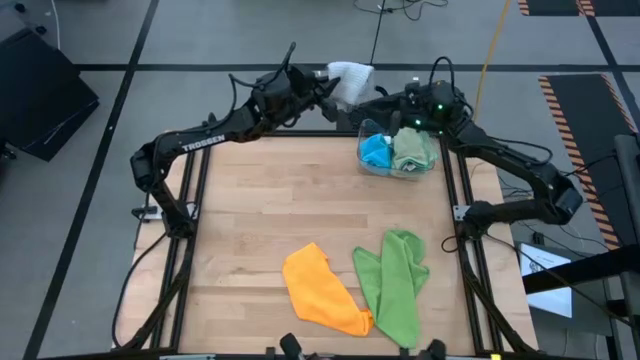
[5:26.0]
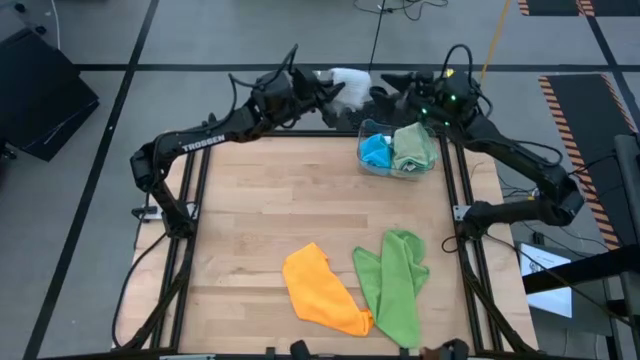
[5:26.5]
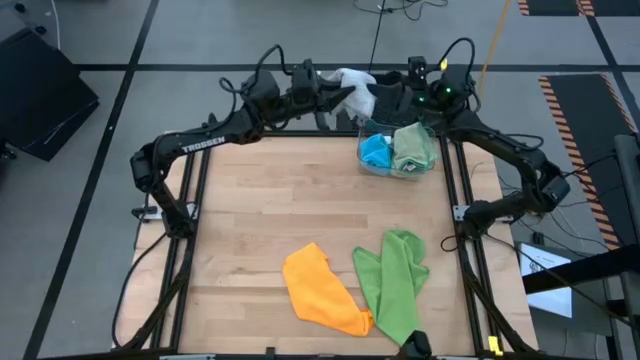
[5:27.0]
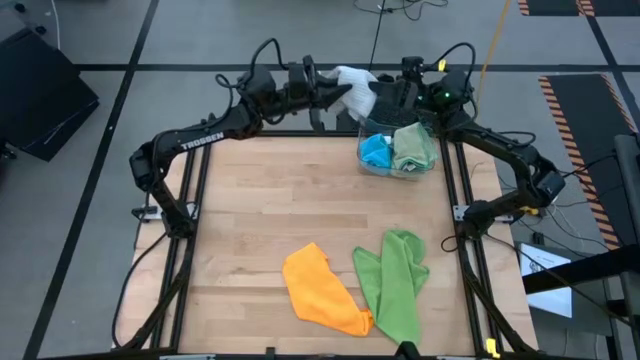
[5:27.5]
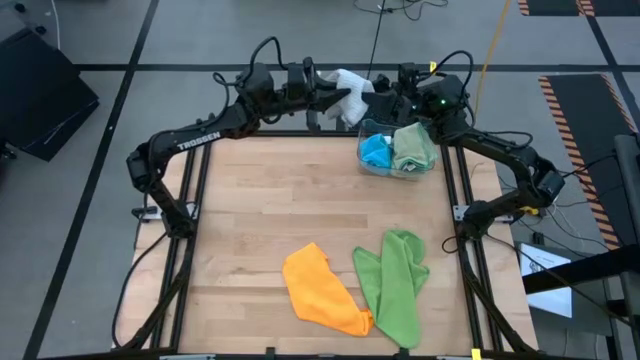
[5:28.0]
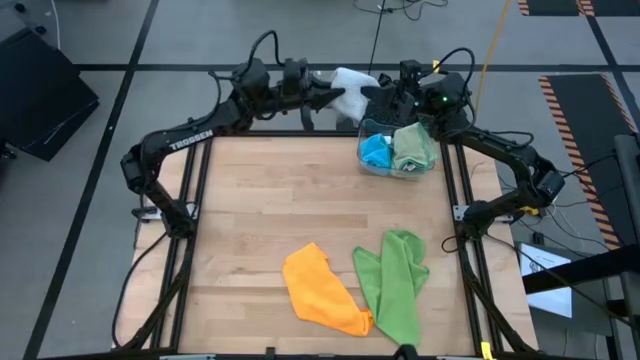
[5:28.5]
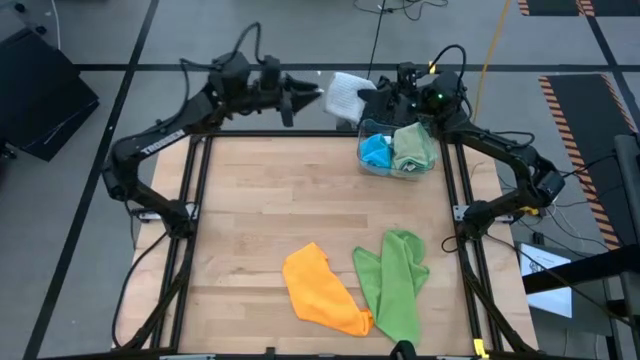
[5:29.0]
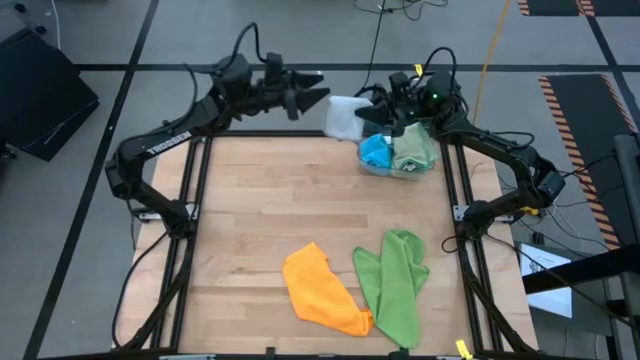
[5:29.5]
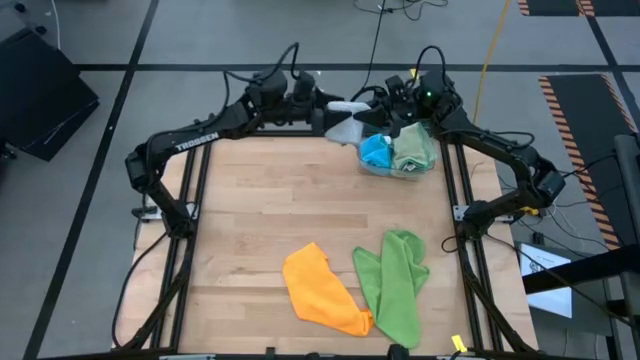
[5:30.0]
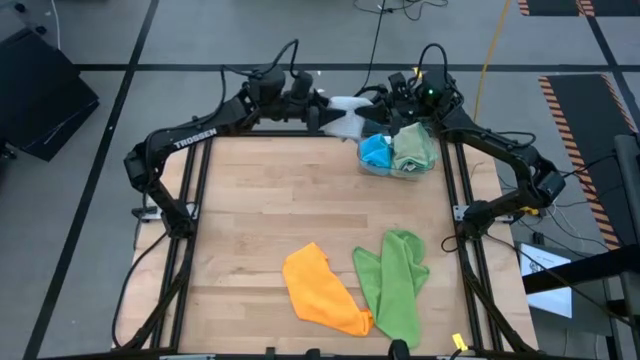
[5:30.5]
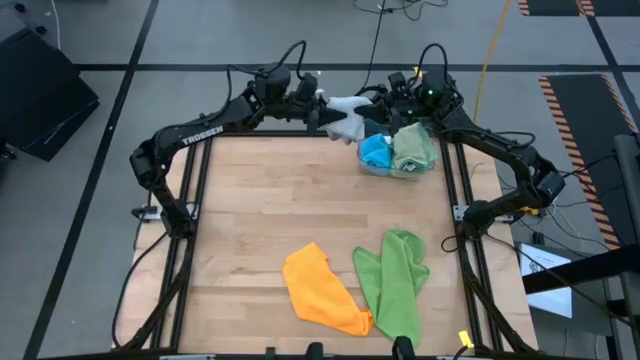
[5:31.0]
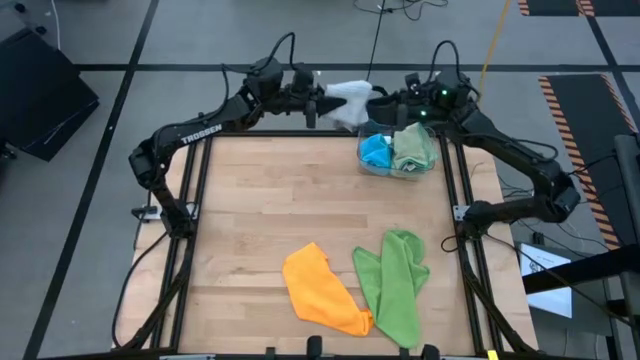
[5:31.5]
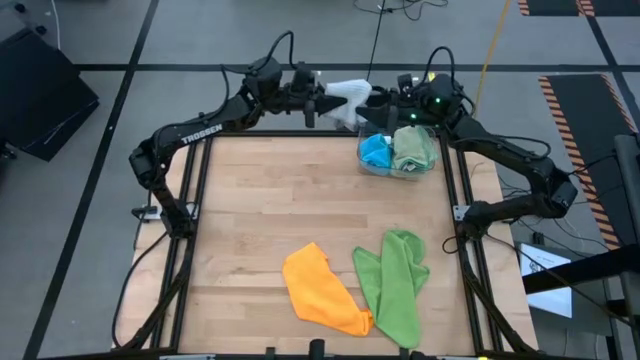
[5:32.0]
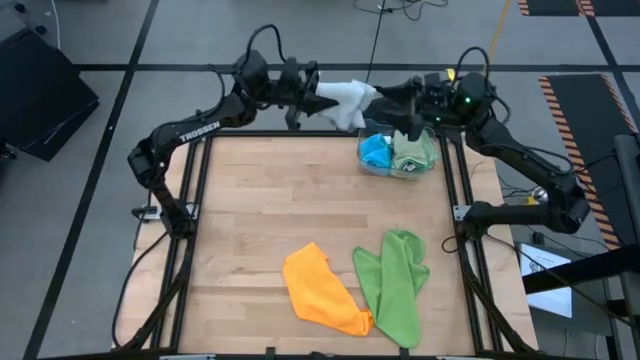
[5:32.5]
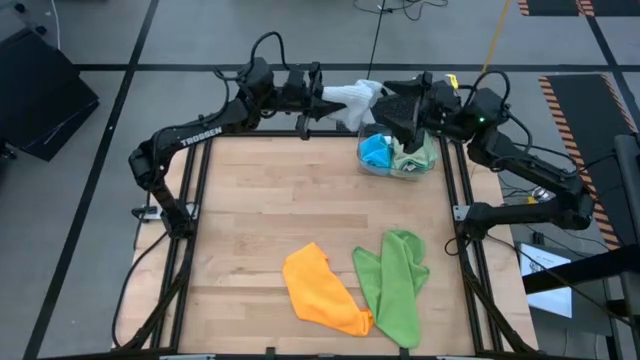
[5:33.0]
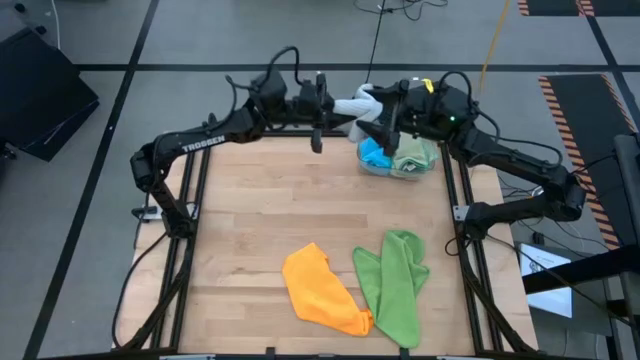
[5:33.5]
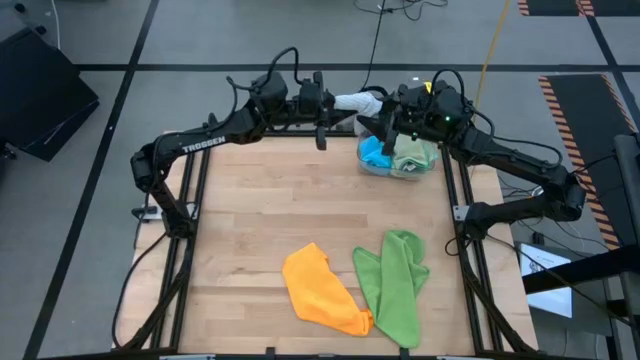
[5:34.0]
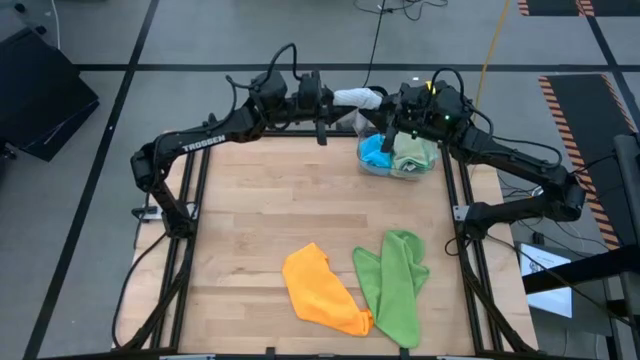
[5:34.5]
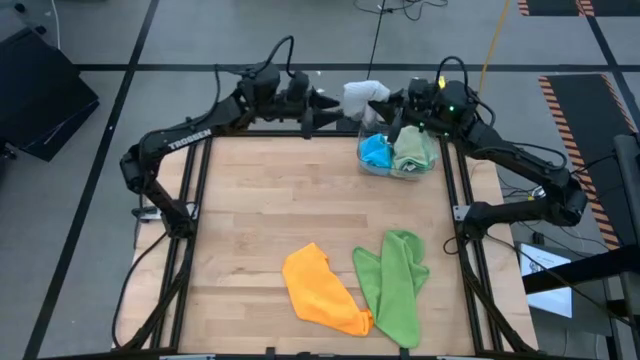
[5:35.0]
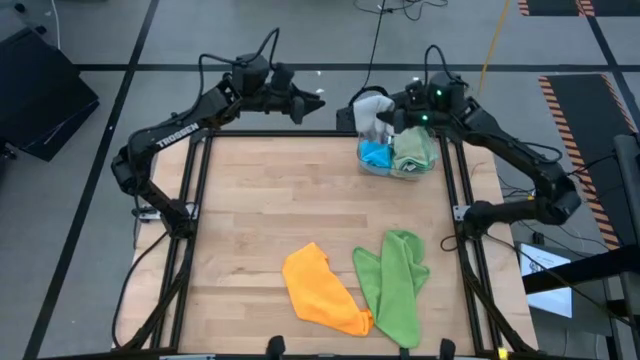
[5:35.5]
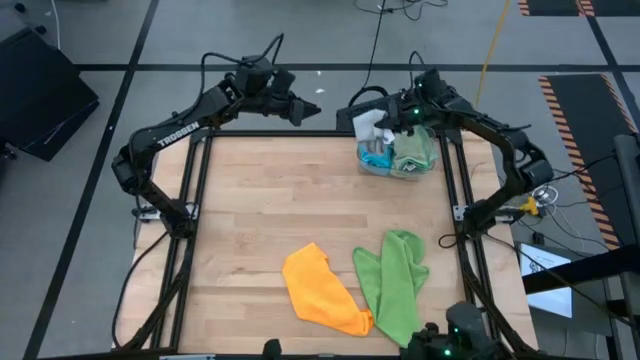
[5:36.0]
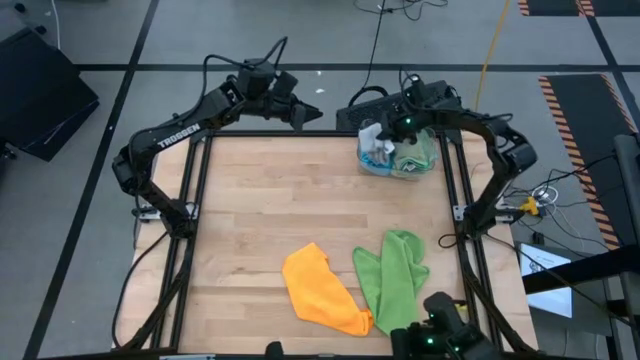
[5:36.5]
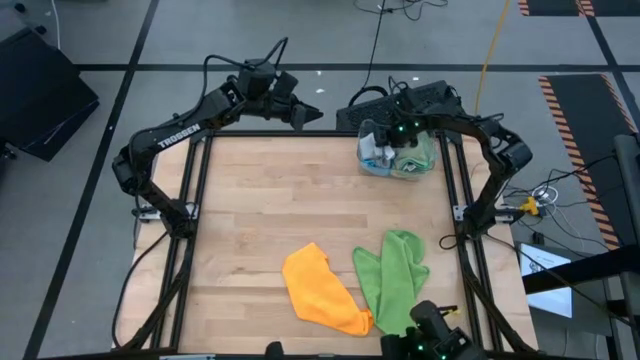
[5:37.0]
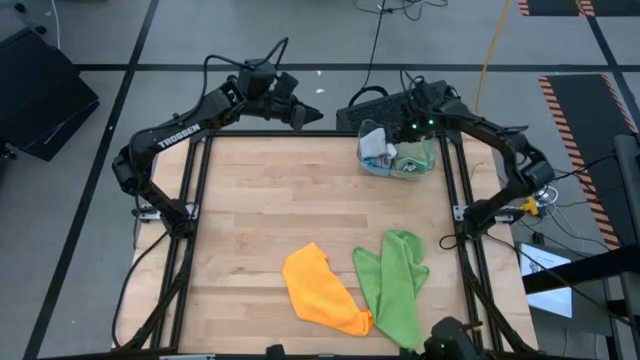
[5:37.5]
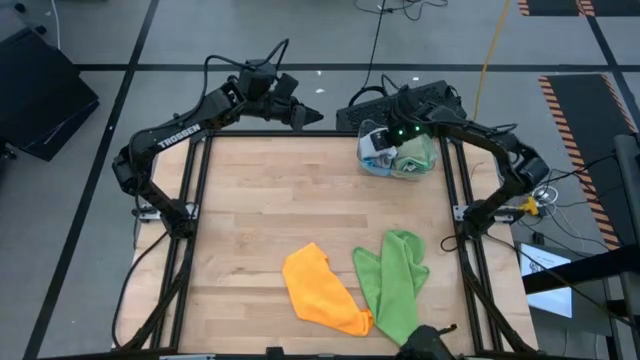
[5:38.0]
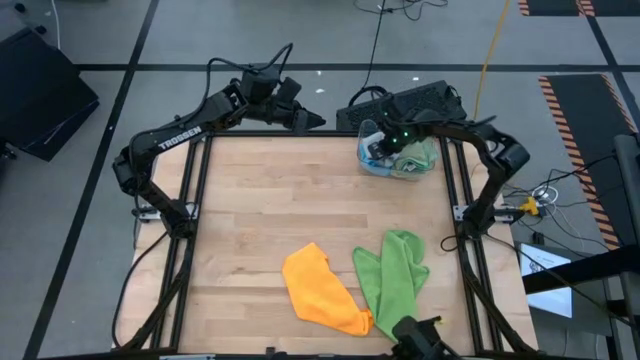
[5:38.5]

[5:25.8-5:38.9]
Task: Fold microfiber towels
Put the grey microfiber towel into the transparent bin

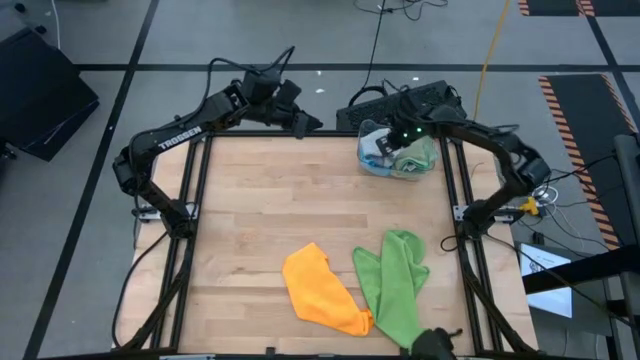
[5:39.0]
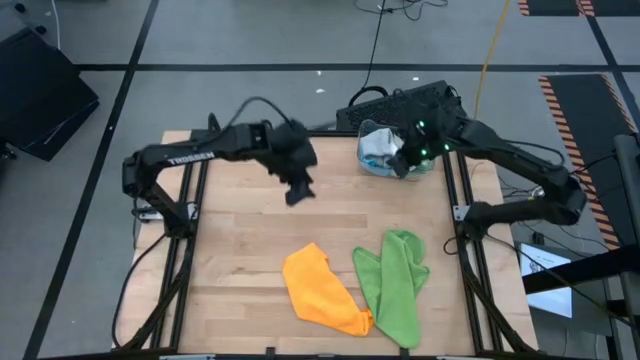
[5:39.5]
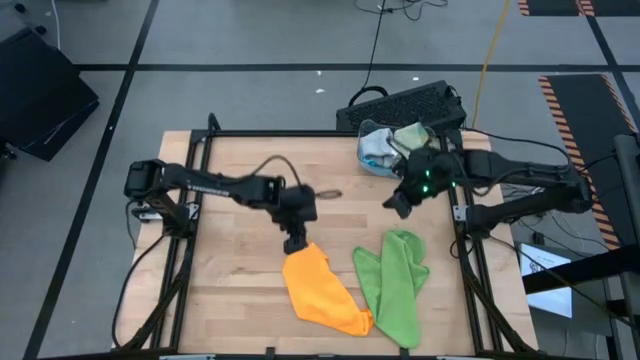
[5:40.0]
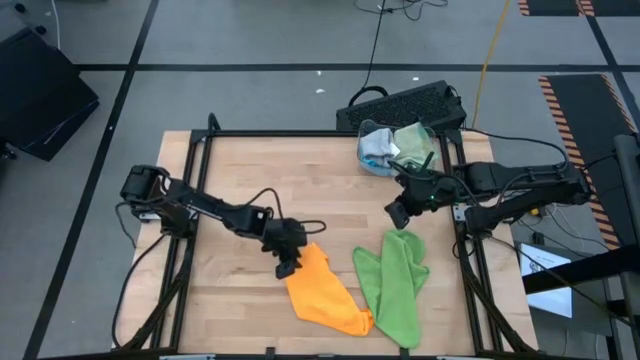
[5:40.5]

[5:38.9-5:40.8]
Fold the yellow microfiber towel

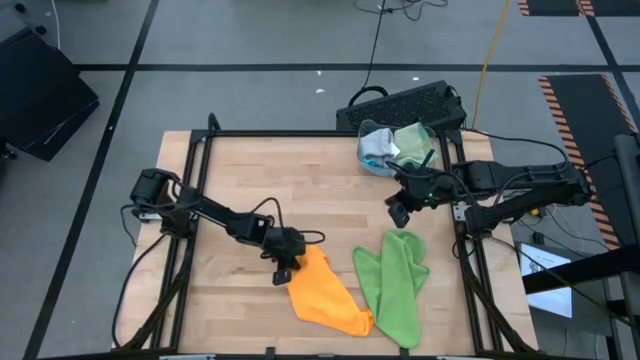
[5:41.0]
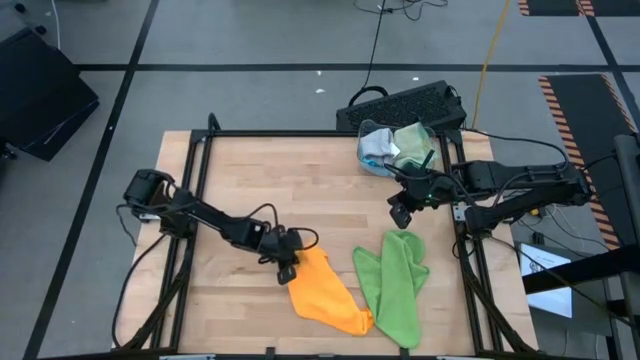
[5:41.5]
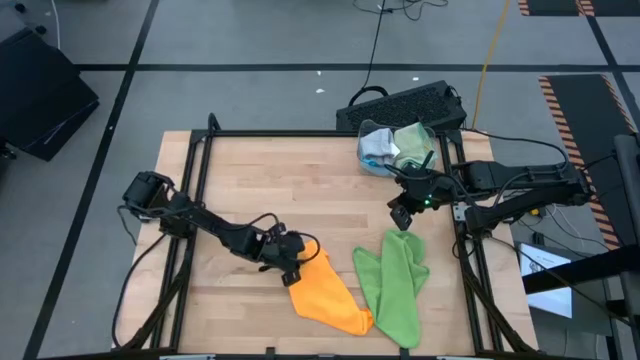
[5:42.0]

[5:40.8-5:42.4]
Fold the yellow microfiber towel
